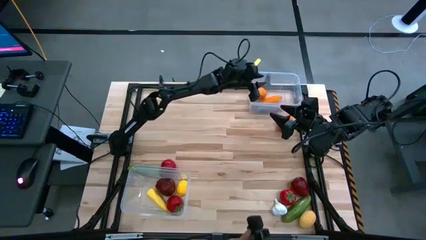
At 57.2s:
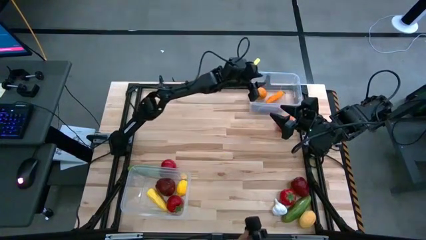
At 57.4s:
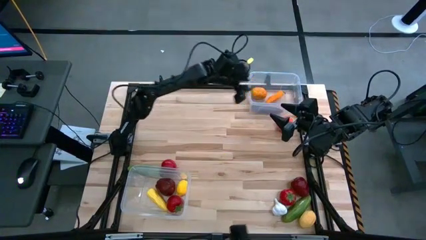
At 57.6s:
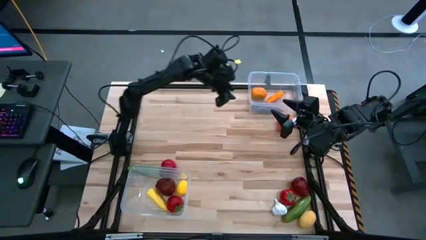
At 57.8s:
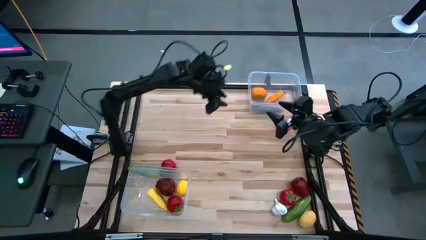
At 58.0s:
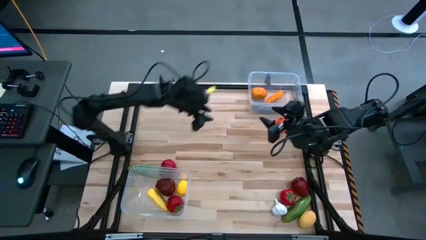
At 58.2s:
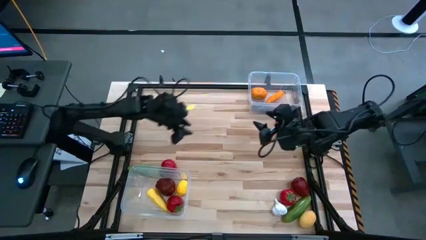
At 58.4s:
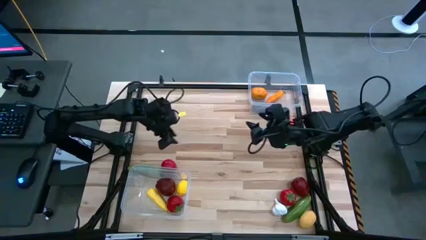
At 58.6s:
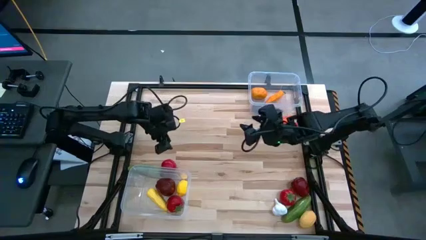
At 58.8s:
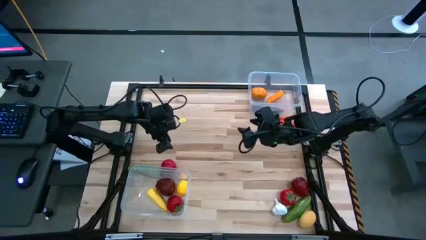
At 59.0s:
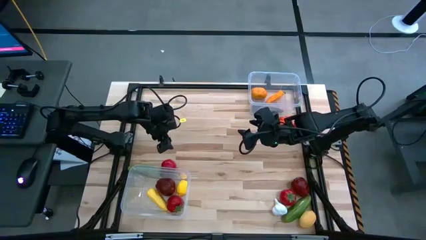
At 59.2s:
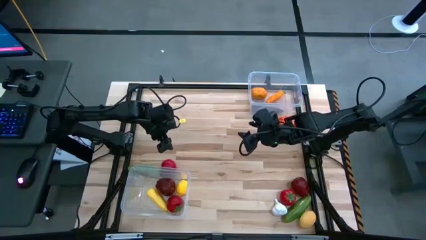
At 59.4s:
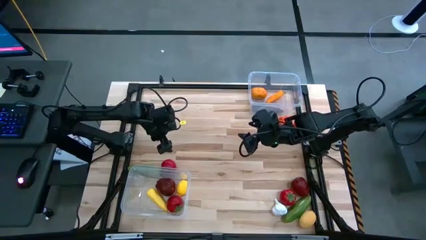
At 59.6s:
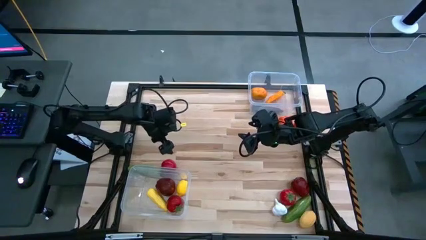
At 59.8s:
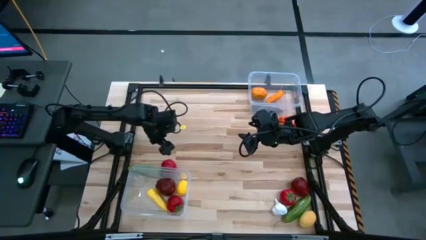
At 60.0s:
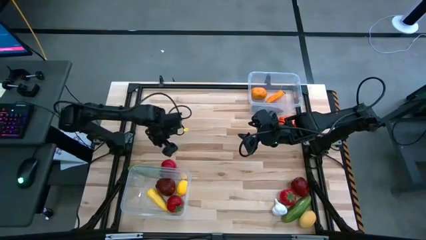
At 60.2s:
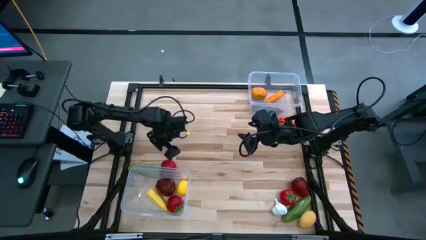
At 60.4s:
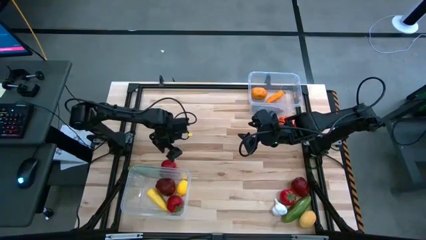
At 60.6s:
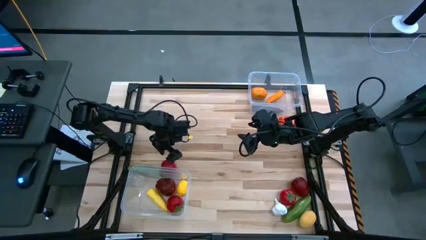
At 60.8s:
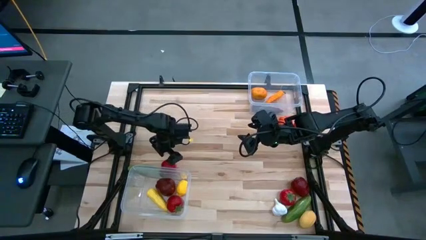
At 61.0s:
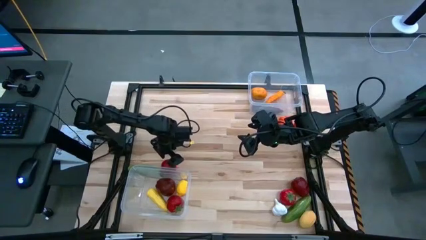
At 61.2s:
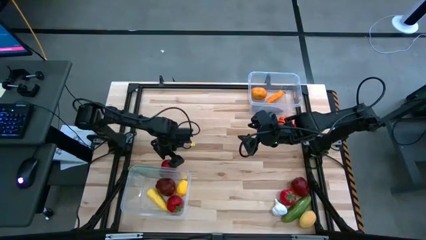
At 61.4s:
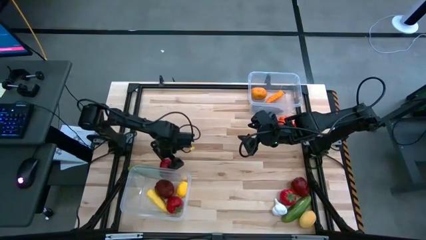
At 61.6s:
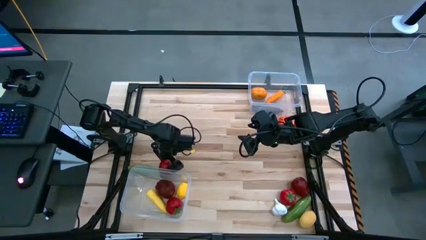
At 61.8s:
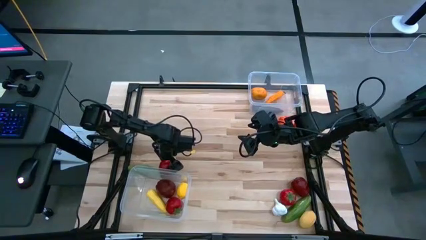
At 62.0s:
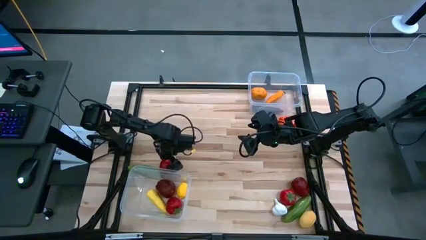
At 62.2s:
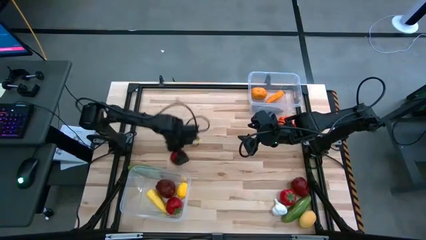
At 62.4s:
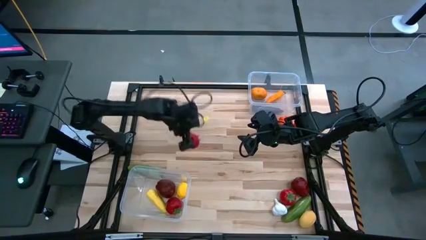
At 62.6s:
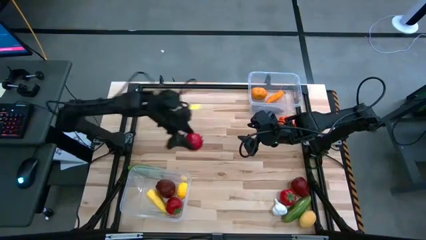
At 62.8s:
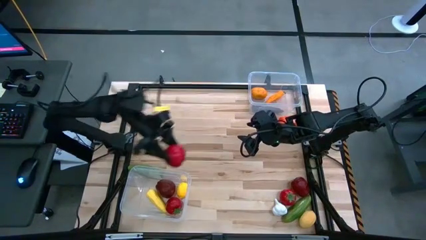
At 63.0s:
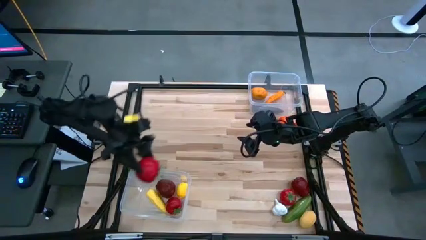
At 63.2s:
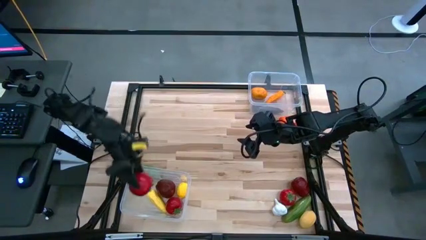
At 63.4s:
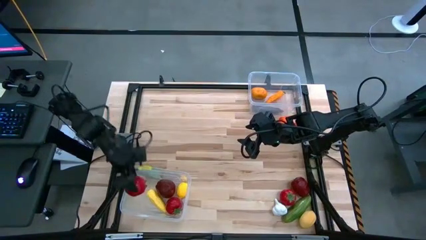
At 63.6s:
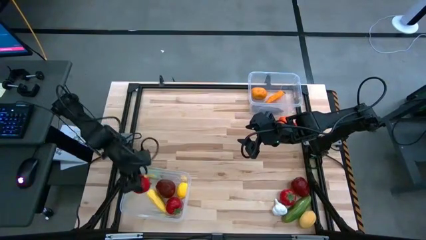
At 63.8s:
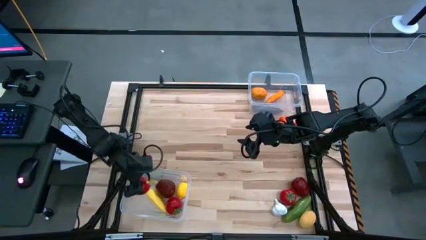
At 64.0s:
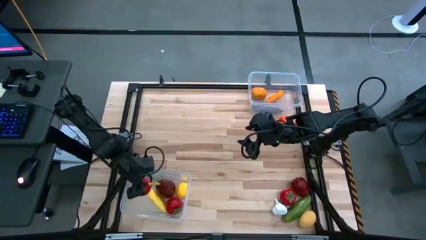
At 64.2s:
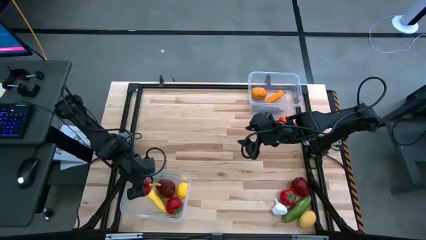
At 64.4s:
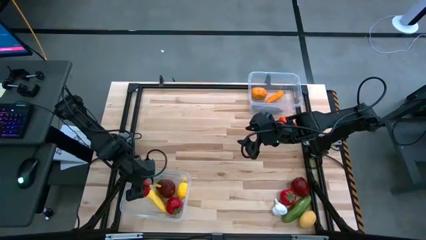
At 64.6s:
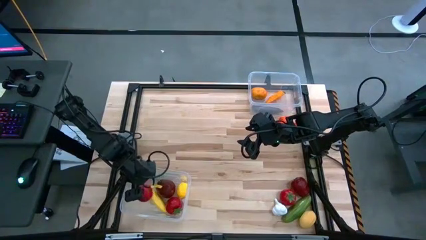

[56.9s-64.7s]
Task: Sort produce into baskets
Put the left red tomato into the bottom transparent bin

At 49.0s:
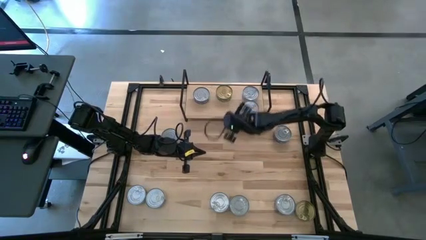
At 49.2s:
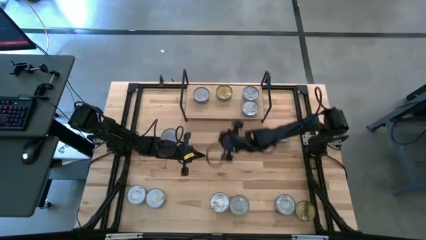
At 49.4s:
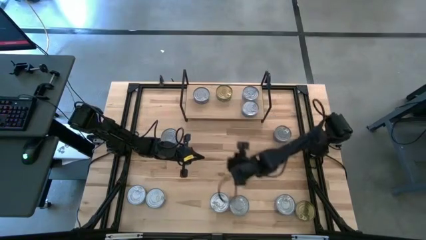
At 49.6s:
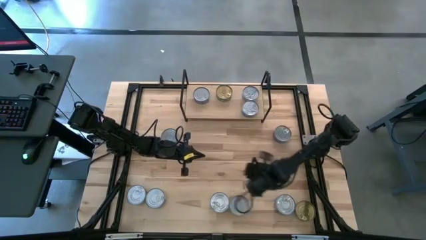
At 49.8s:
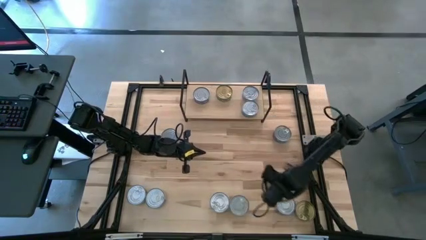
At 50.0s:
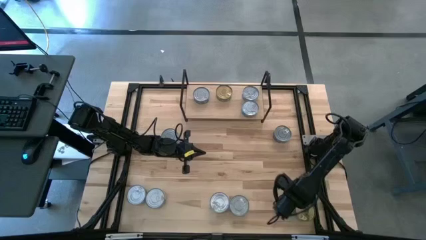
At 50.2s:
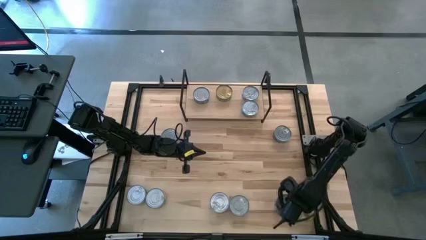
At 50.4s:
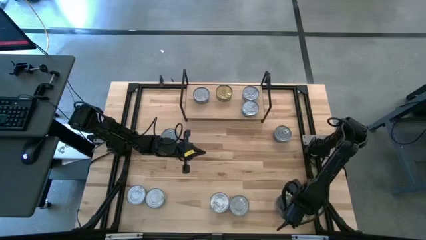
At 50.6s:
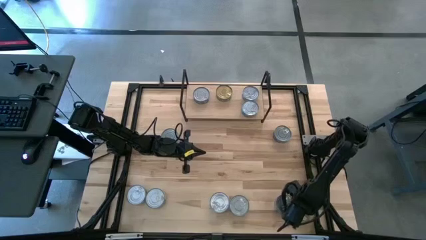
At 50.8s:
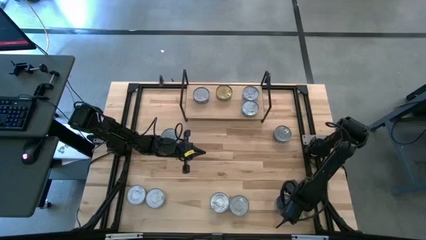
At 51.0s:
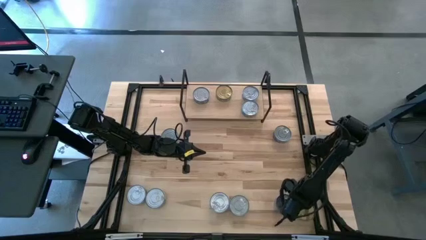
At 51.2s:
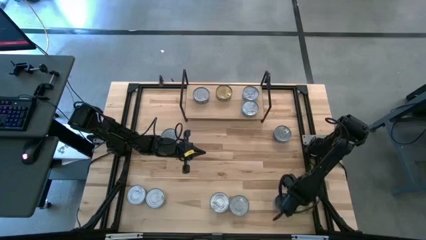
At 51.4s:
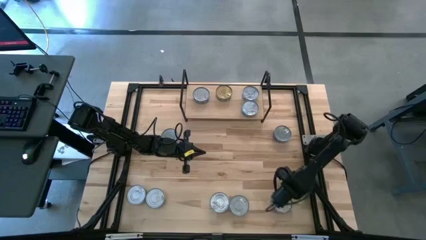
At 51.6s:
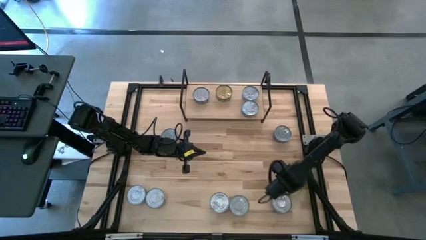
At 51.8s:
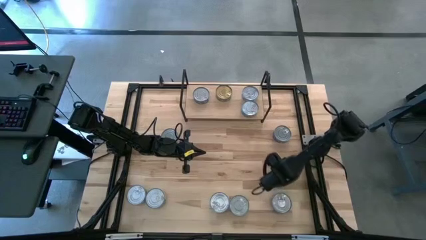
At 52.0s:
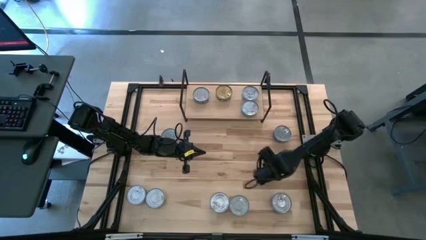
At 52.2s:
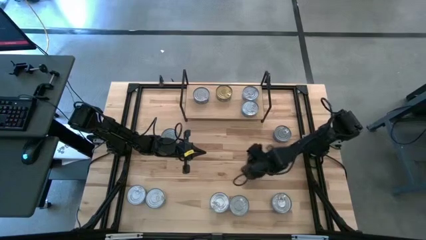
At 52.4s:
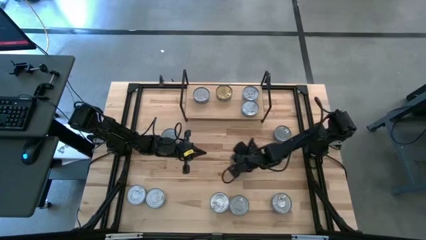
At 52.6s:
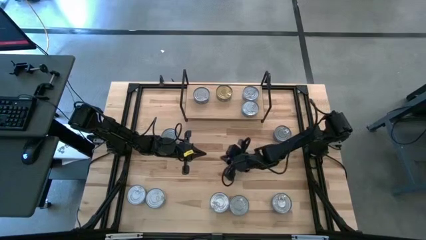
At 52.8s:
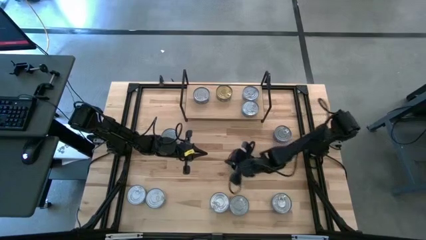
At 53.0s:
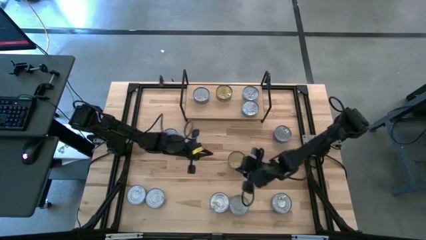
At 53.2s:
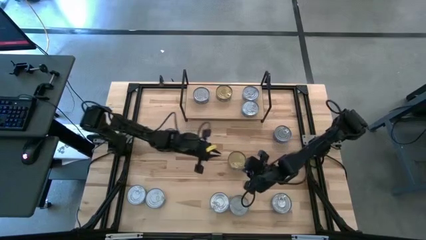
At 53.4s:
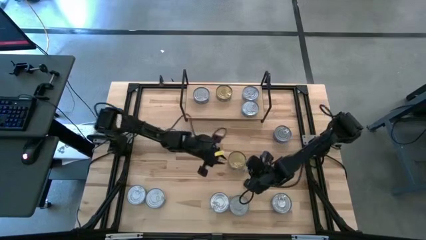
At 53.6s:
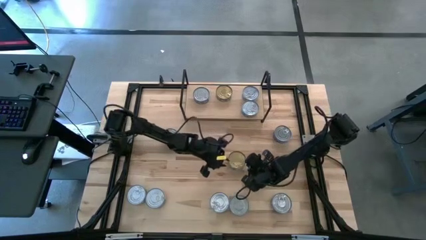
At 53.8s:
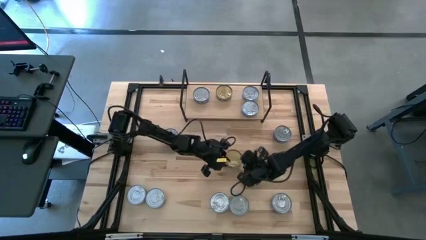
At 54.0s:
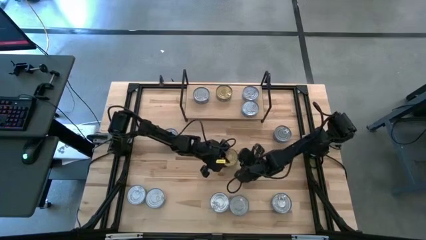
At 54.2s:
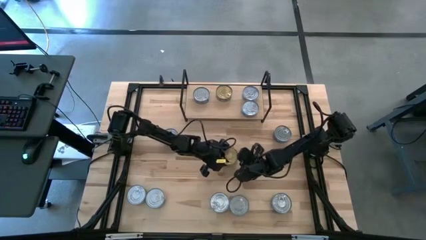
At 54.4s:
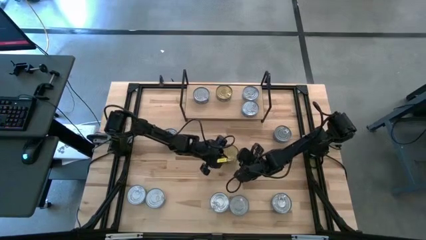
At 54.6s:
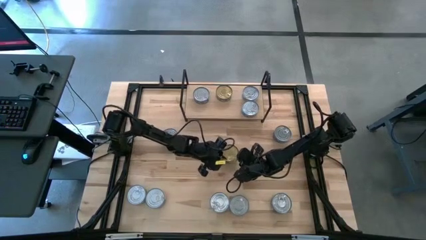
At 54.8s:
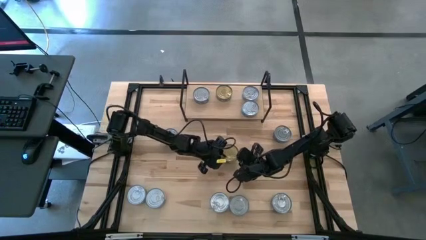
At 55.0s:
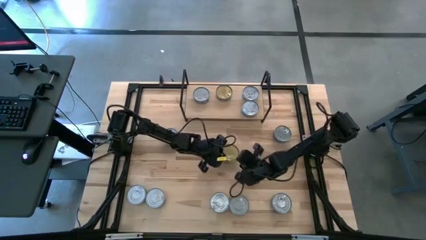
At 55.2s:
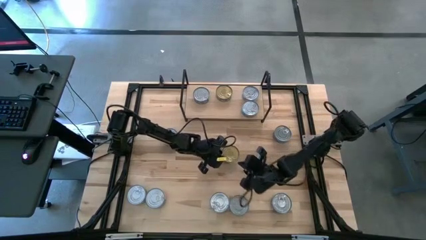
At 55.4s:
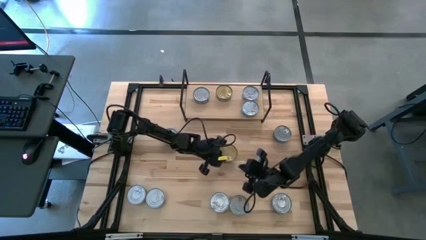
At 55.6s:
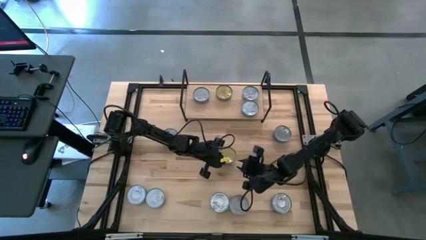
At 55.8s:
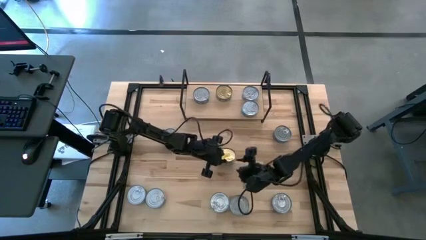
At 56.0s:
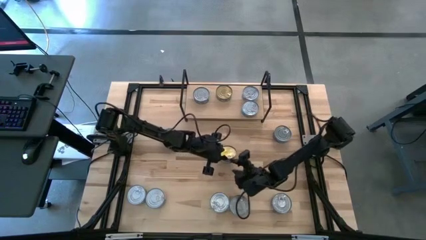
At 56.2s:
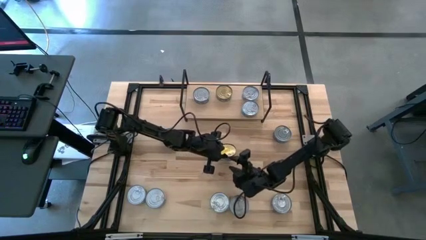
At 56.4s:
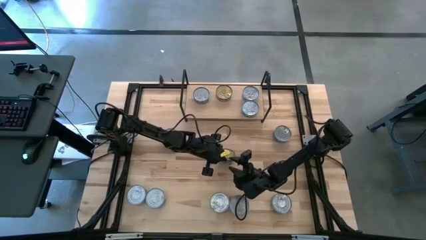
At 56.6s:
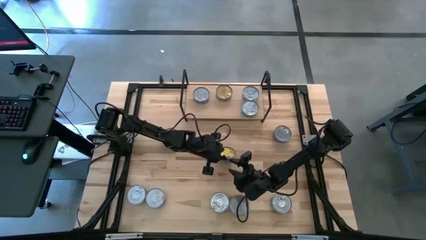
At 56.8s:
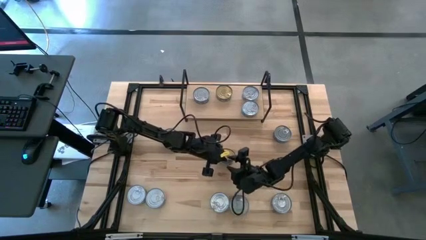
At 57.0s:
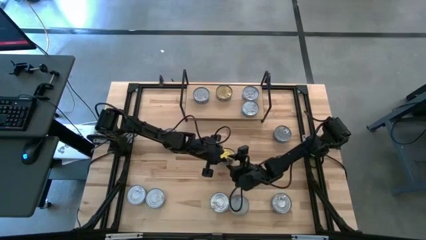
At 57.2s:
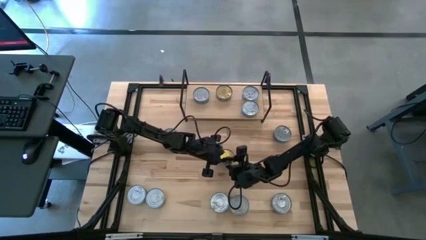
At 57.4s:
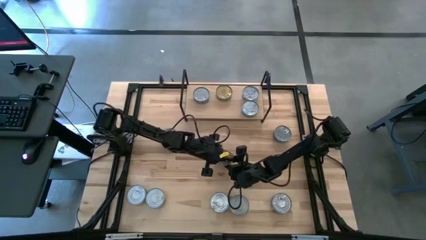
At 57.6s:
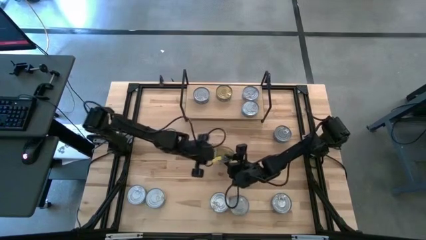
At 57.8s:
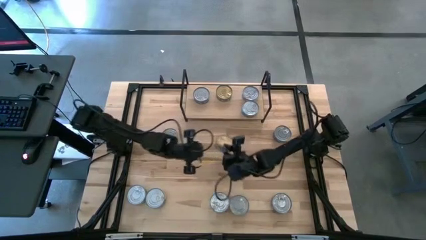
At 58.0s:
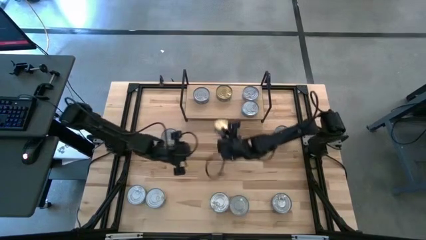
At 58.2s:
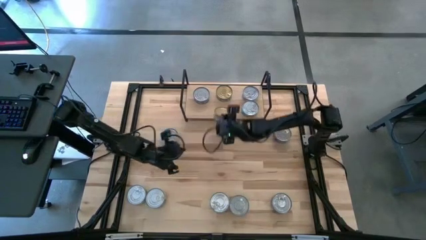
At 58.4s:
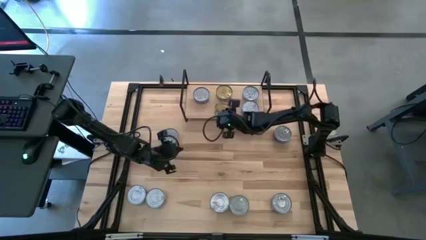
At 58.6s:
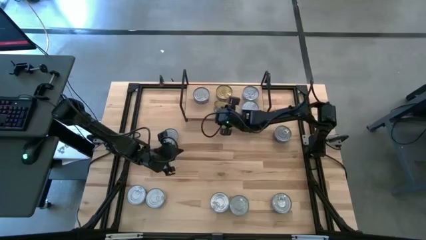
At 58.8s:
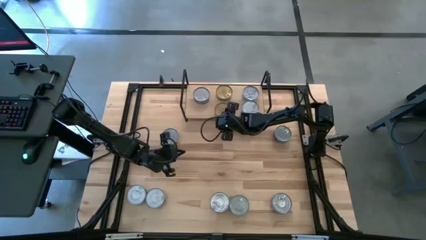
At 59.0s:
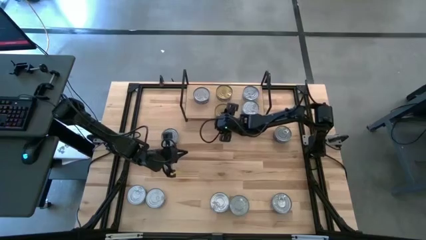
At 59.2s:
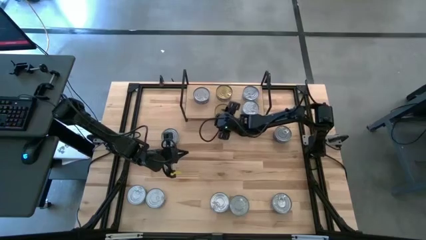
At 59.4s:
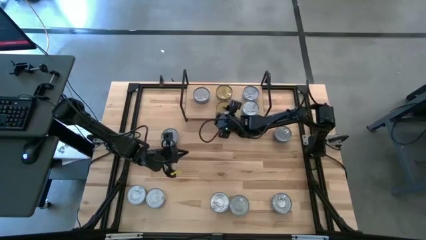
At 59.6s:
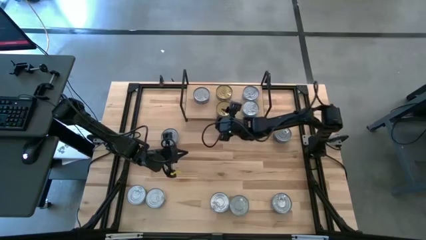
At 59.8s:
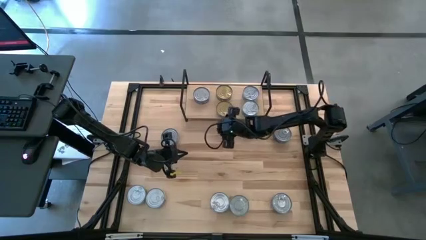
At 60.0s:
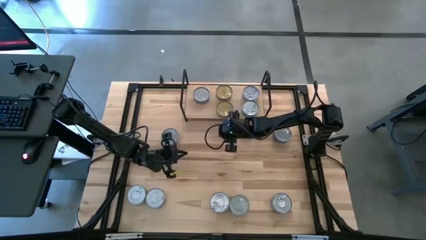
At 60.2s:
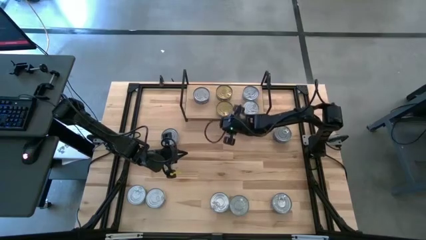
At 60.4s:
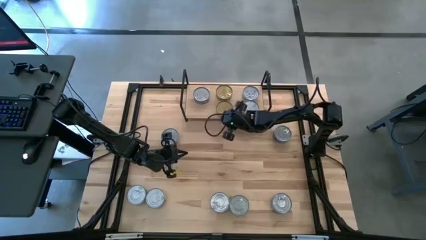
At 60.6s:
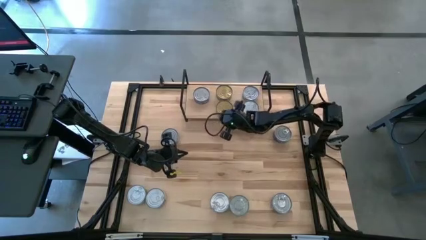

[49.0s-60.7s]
Task: Stack canned seafood by type on shelf
Put the right green tuna can on the shelf aligned with the other green tuna can
